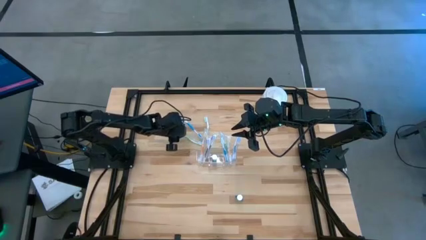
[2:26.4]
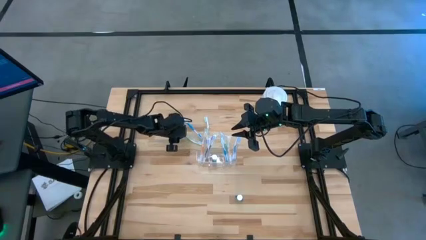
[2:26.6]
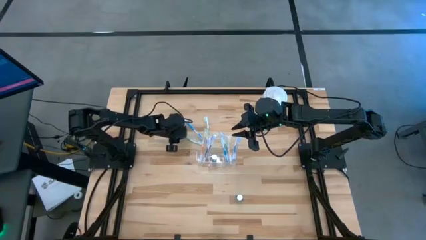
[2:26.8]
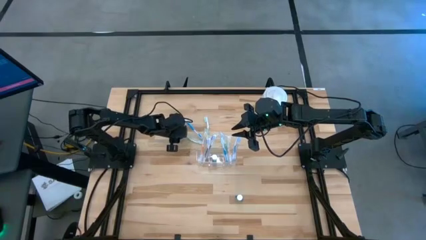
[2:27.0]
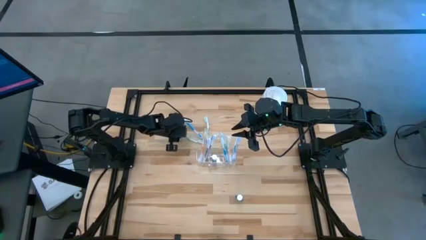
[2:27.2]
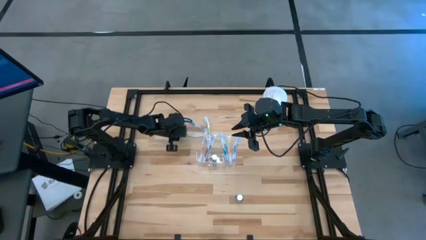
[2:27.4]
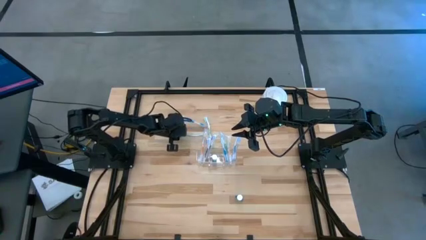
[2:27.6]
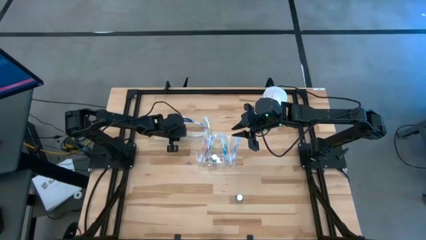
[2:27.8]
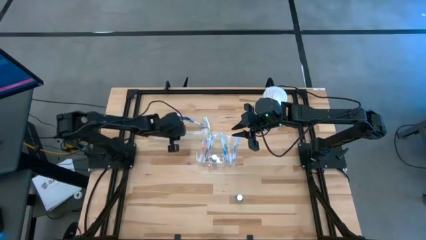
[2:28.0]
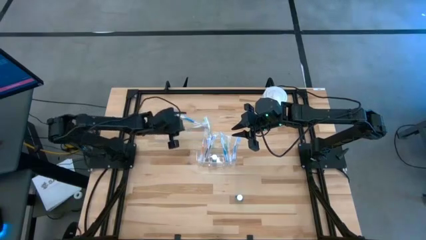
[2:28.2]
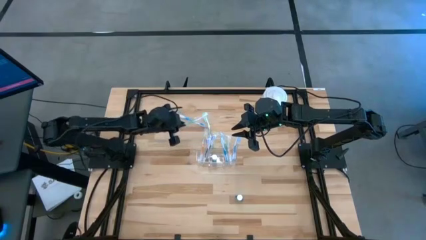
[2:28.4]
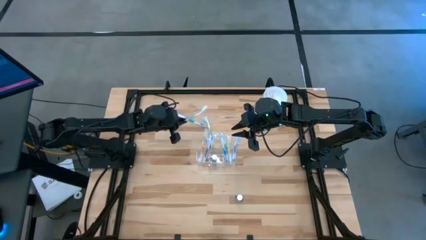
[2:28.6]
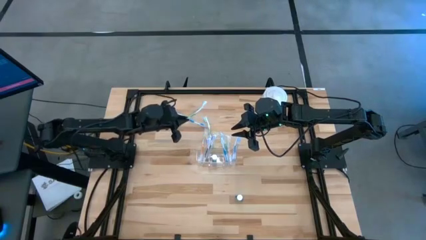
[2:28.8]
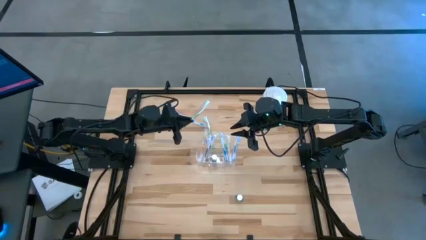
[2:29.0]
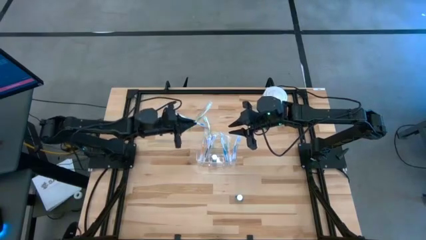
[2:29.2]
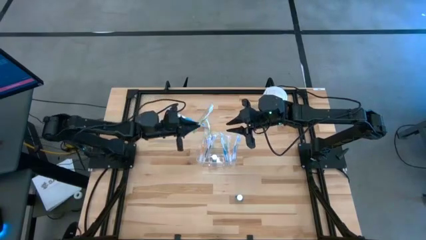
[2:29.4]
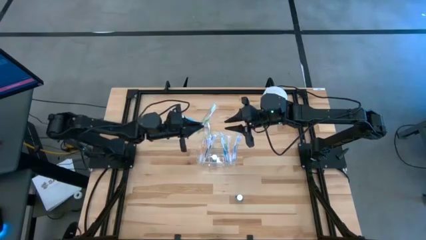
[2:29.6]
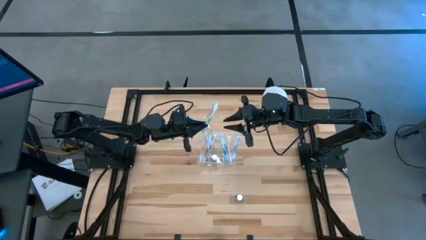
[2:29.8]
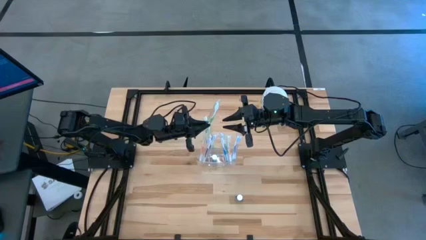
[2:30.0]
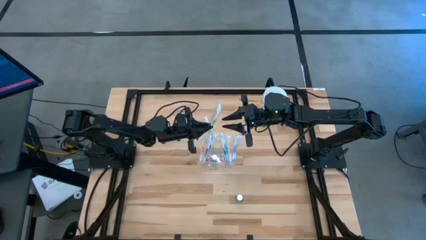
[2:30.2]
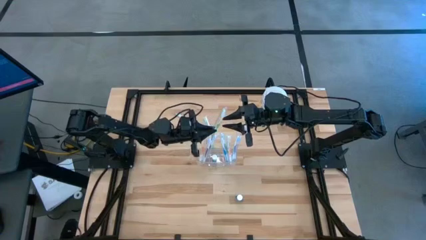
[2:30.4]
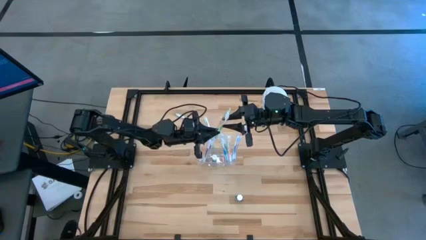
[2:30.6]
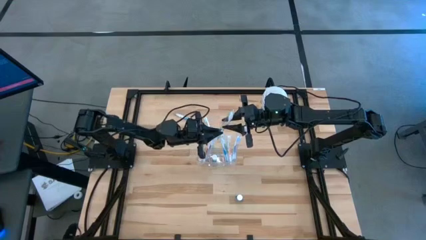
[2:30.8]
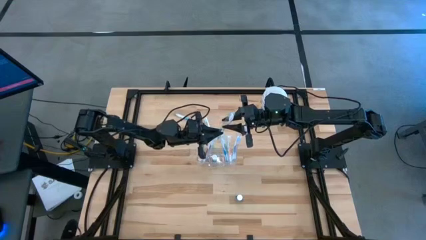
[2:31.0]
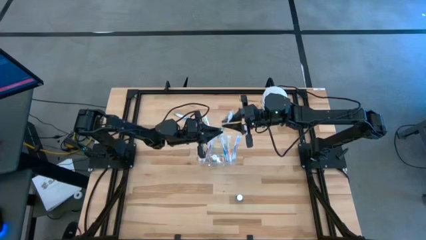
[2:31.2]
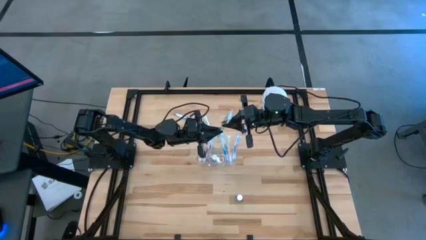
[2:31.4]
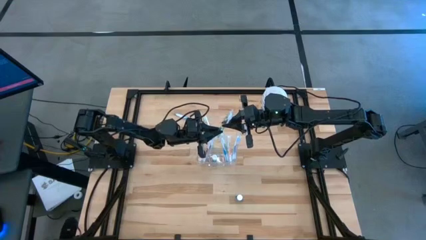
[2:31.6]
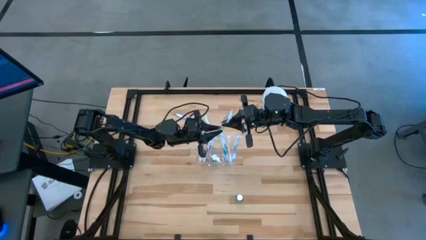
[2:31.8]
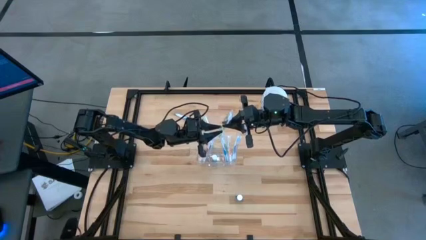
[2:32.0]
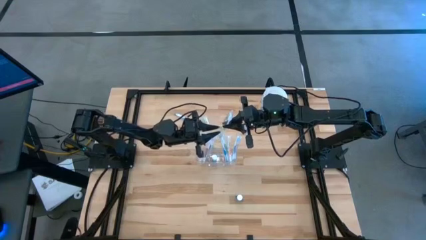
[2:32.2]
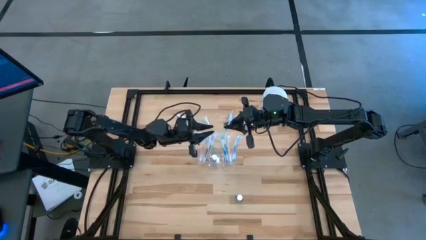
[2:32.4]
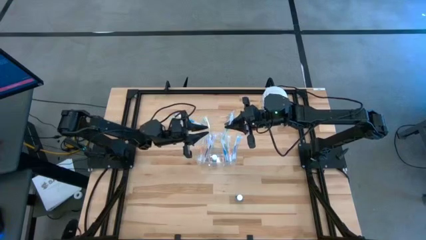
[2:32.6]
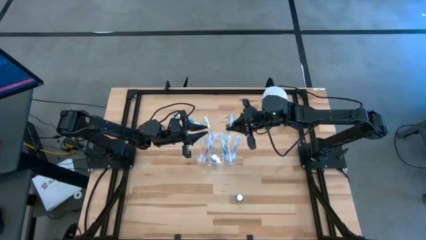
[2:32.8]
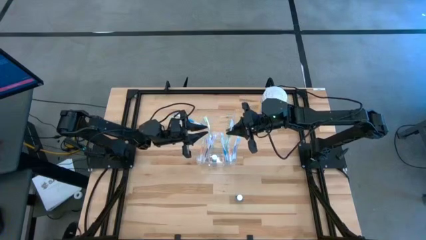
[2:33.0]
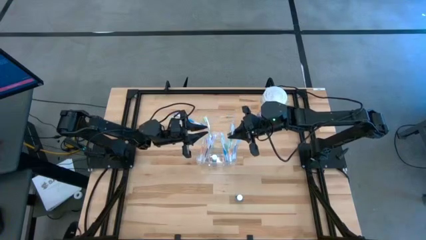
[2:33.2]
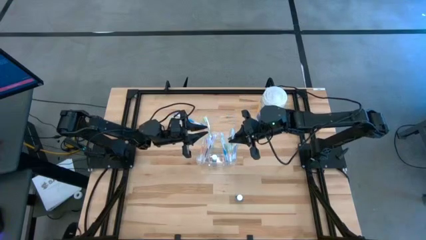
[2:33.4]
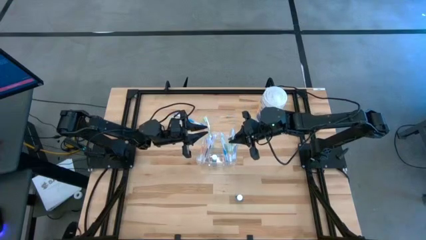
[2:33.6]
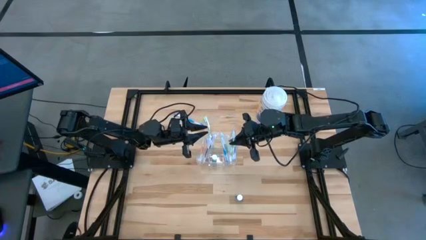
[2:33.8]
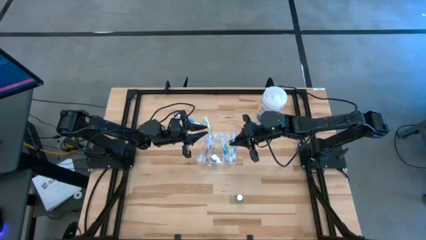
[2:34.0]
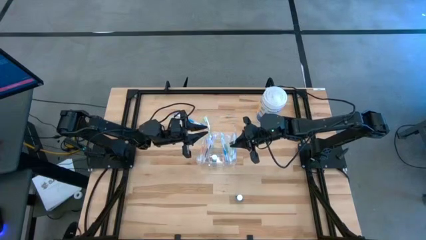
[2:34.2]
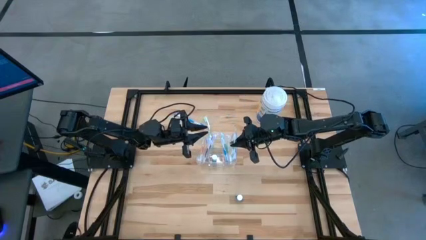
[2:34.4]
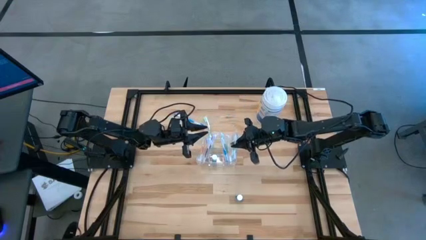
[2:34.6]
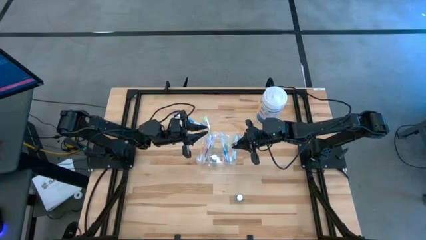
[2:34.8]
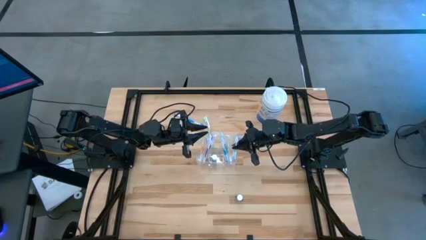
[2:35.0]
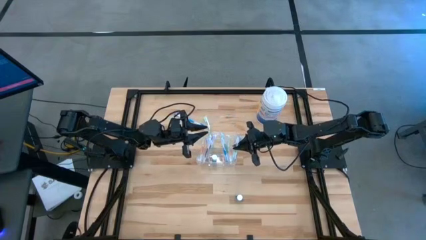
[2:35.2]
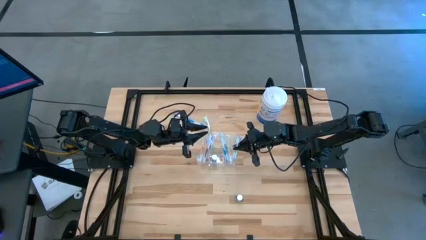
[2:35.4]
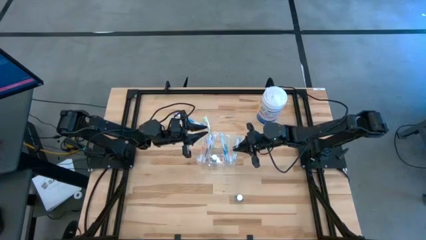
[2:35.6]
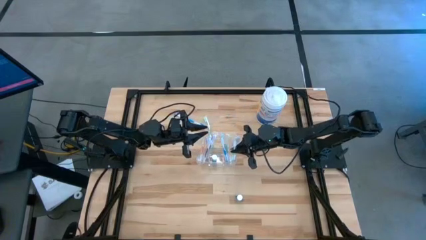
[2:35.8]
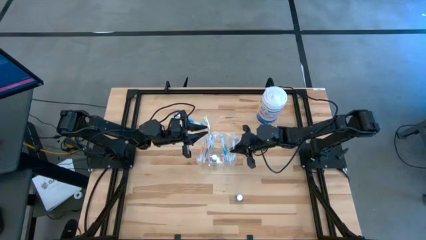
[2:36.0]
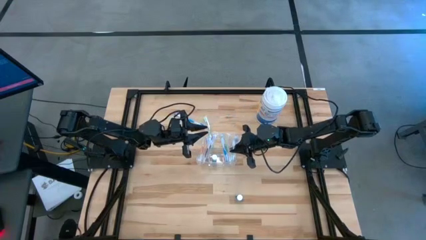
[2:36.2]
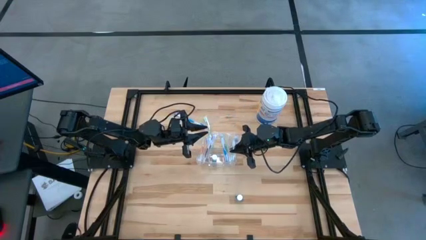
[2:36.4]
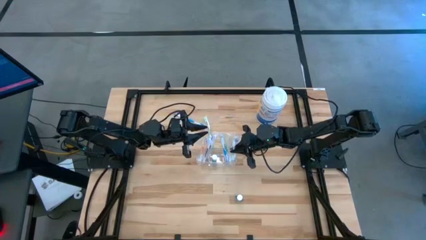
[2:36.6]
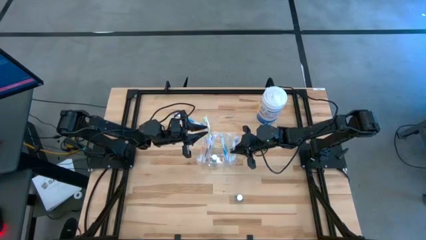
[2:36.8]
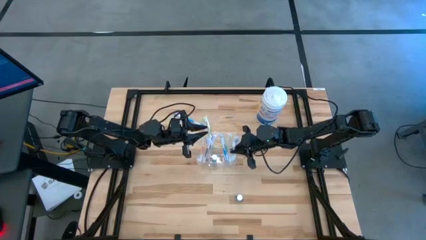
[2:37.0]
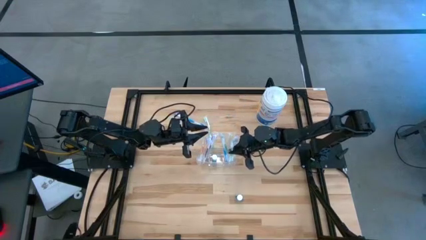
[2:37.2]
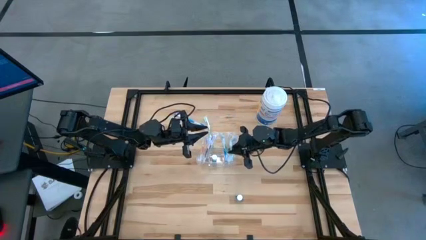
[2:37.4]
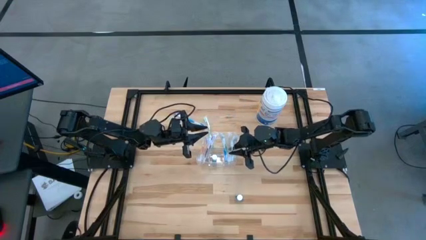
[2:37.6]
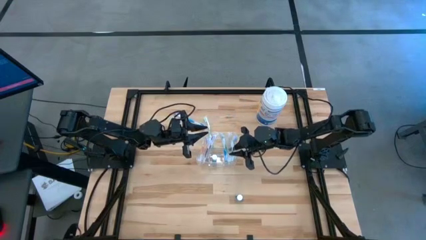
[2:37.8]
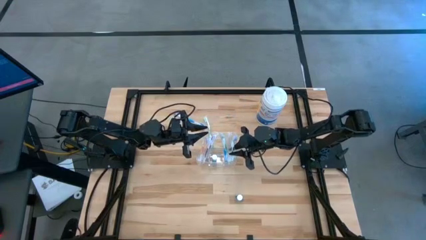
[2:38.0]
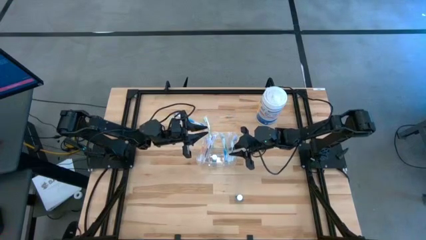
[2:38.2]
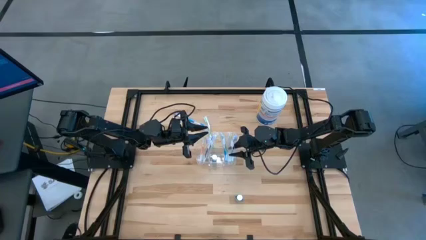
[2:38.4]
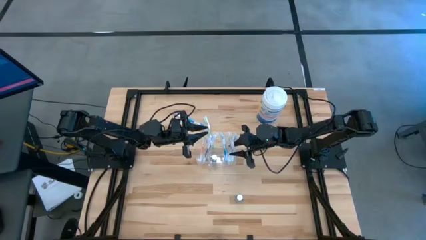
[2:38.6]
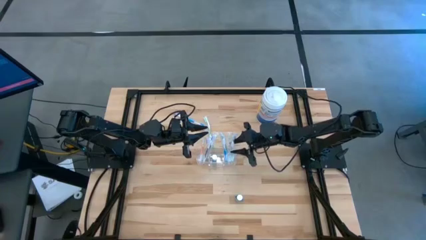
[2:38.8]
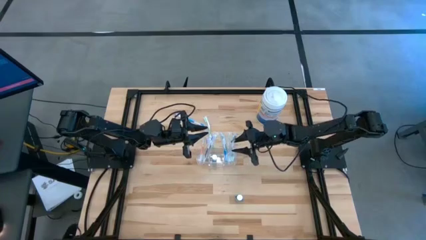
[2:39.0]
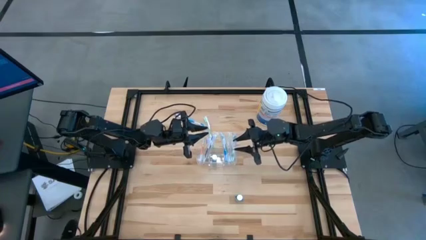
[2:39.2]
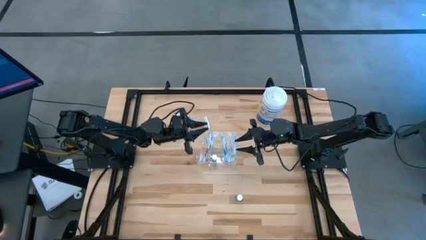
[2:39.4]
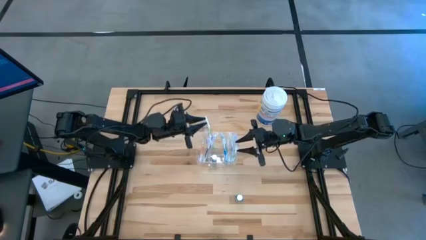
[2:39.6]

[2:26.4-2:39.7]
Task: Pick & Place toothbrushing station
Put the left green toothbrush into the transparent organizer

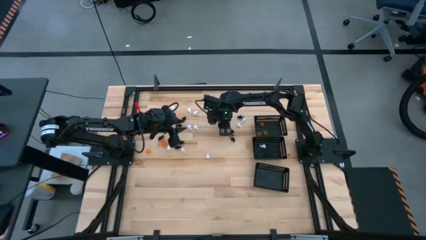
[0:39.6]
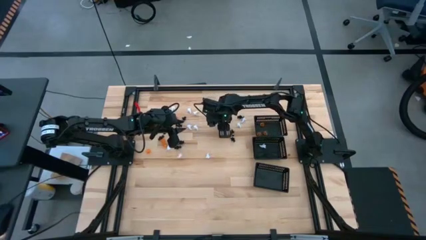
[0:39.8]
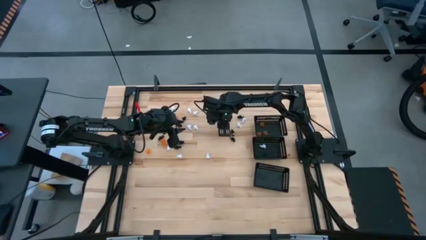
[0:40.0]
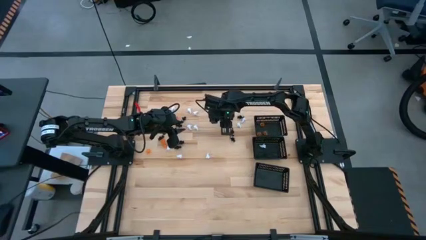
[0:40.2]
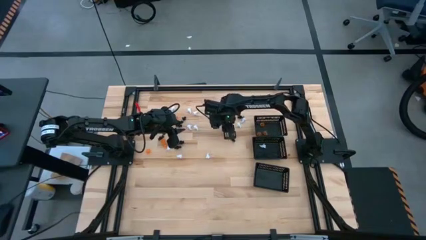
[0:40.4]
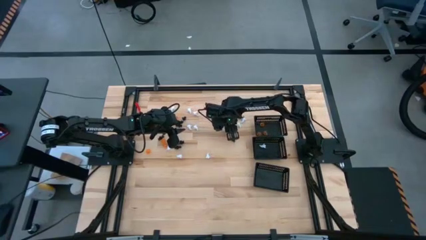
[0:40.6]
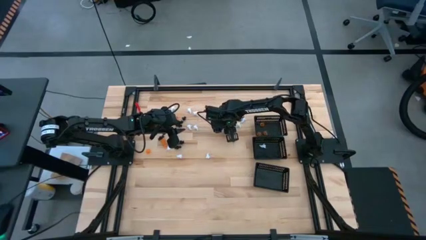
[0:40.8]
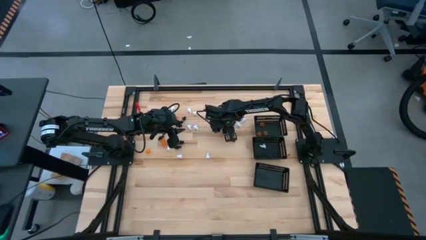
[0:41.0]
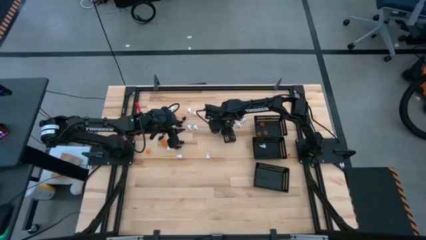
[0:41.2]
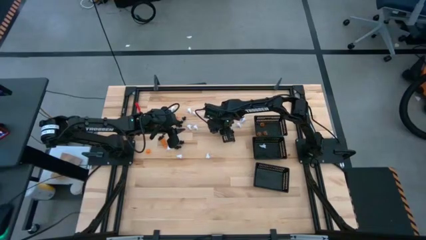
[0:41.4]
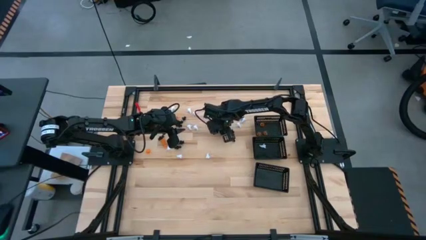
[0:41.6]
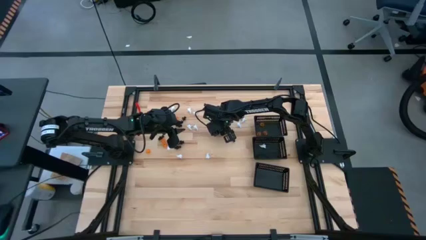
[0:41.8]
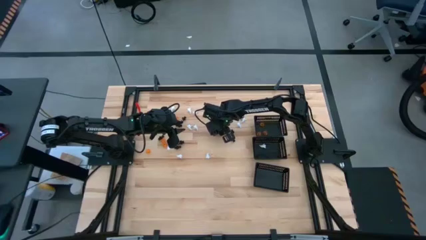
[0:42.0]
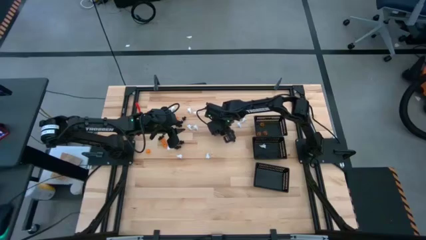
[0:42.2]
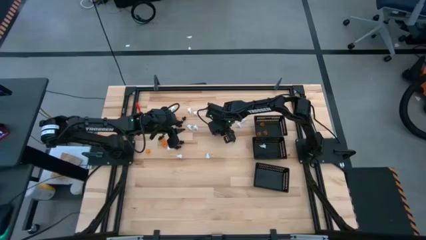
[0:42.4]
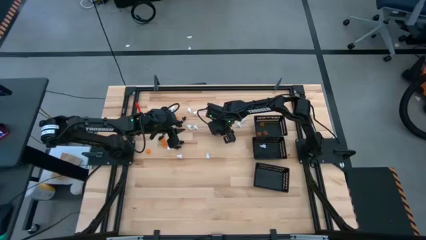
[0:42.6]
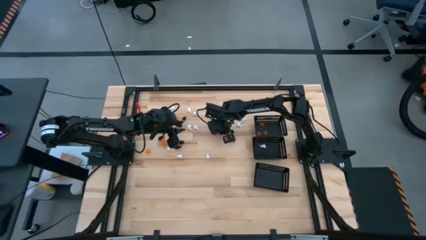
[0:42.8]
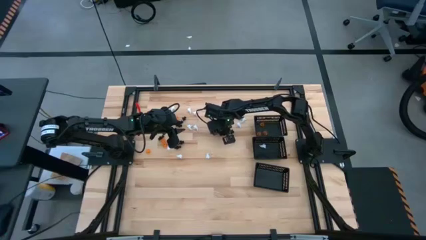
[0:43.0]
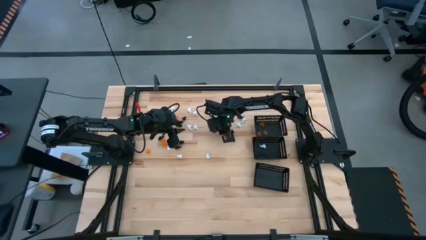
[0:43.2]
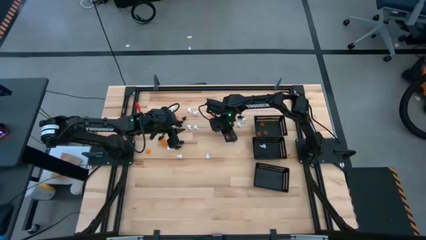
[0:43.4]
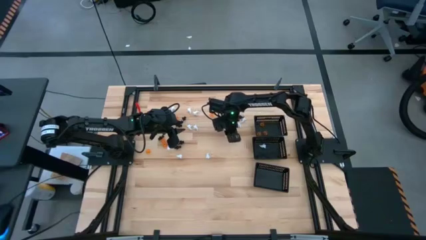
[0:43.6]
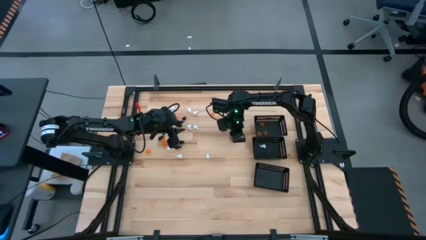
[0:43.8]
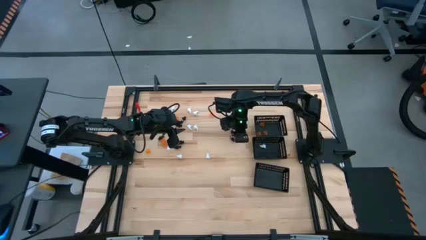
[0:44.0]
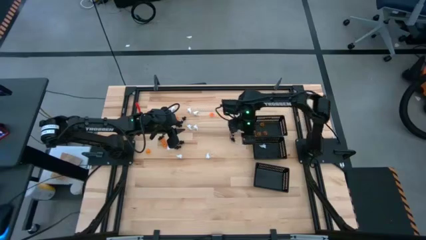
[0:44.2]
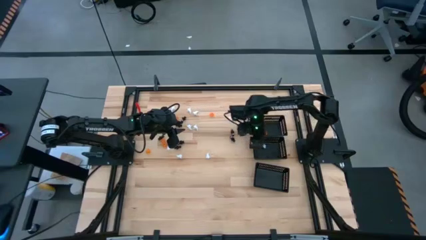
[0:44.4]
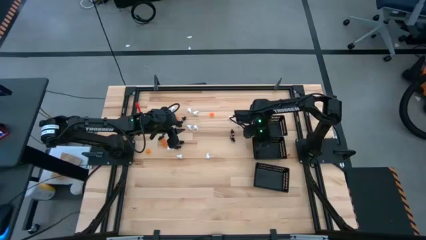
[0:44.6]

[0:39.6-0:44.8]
Task: Sort Halloween decoration
Put the white ghost toy into the center black bin
